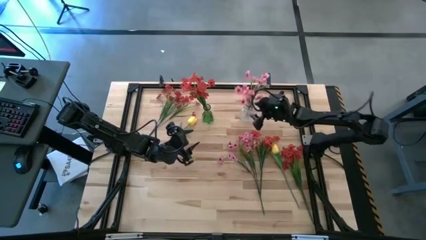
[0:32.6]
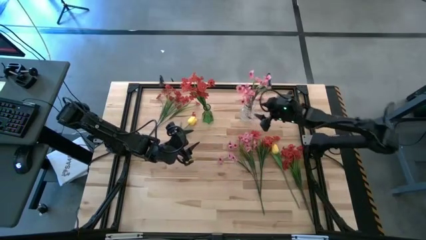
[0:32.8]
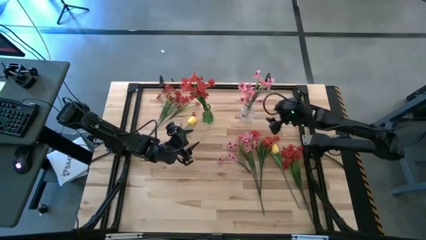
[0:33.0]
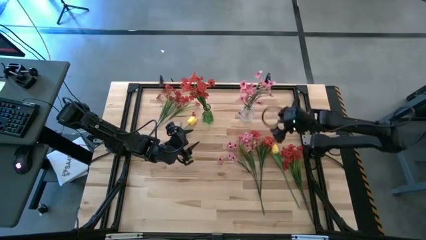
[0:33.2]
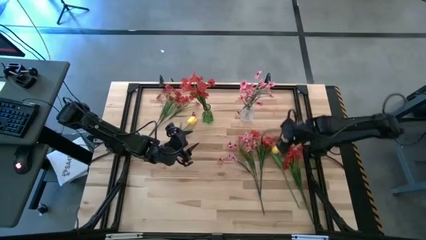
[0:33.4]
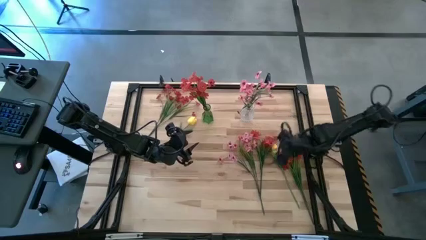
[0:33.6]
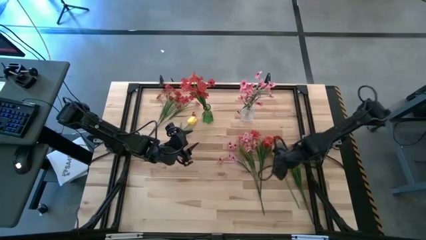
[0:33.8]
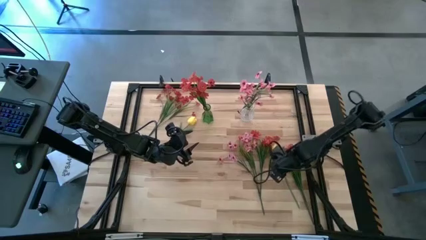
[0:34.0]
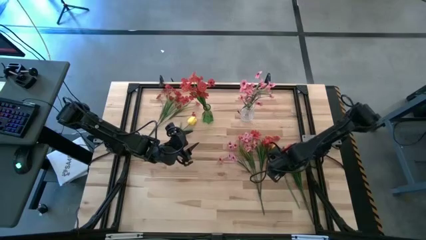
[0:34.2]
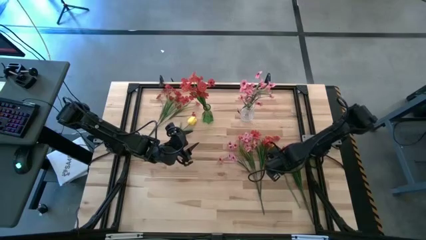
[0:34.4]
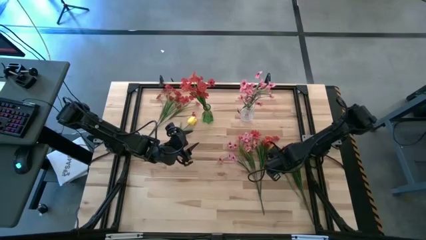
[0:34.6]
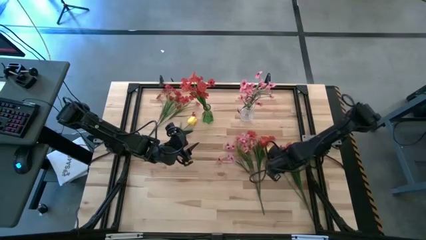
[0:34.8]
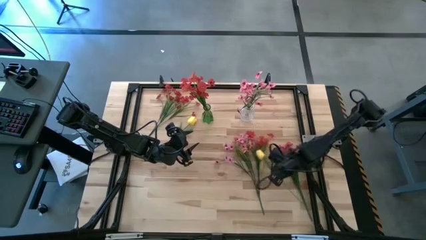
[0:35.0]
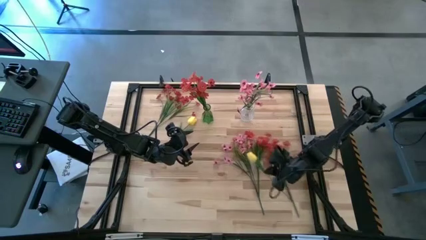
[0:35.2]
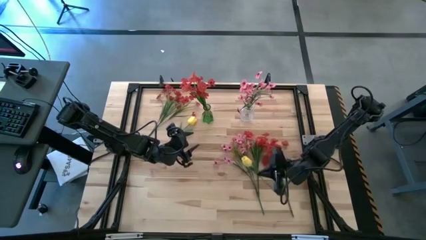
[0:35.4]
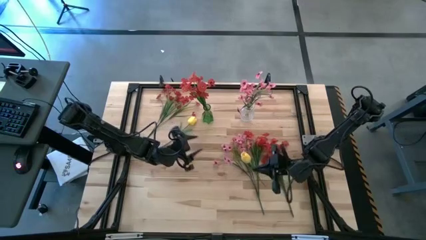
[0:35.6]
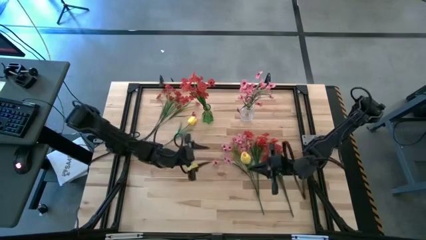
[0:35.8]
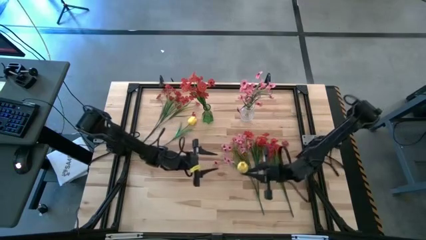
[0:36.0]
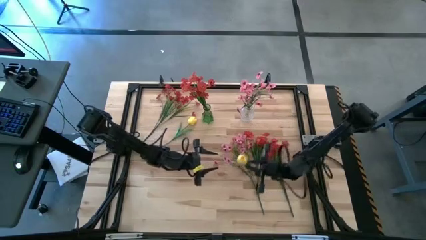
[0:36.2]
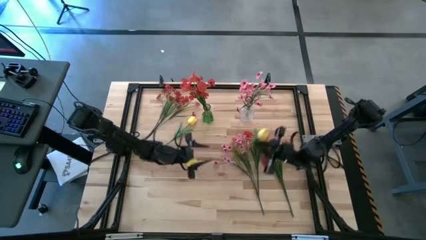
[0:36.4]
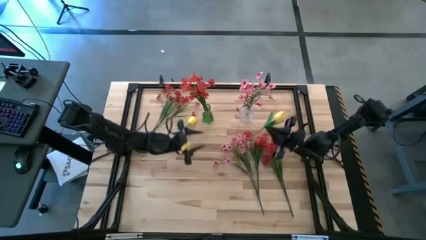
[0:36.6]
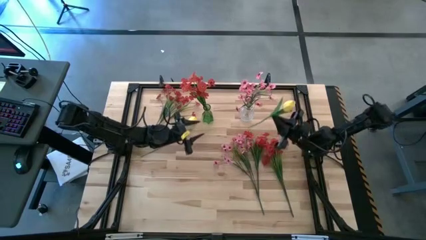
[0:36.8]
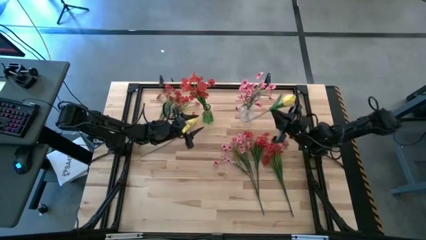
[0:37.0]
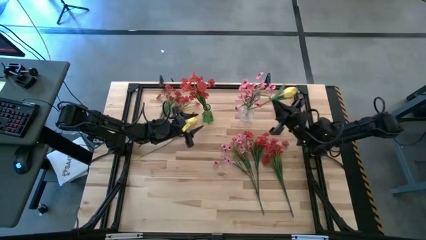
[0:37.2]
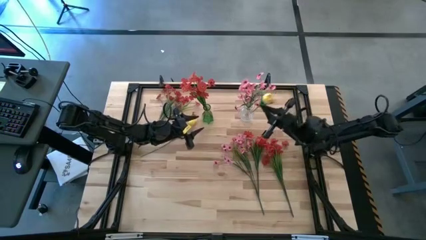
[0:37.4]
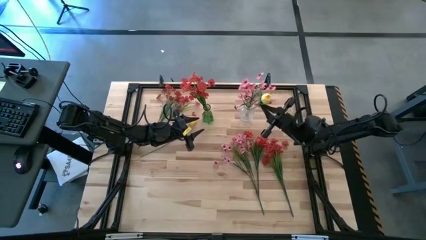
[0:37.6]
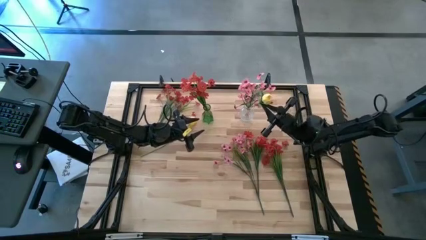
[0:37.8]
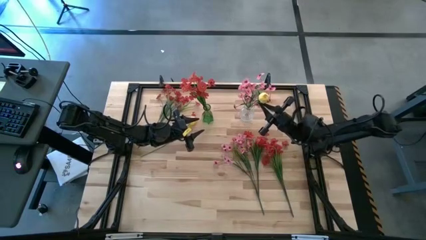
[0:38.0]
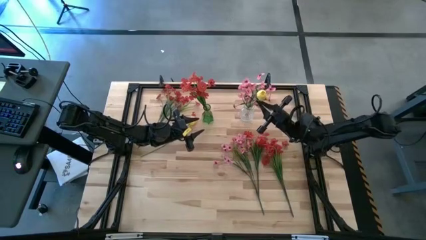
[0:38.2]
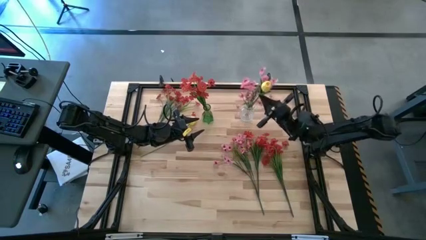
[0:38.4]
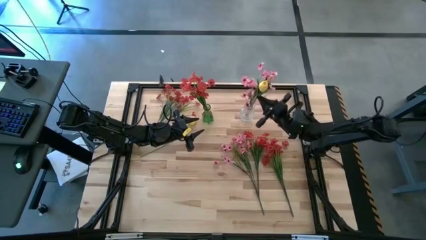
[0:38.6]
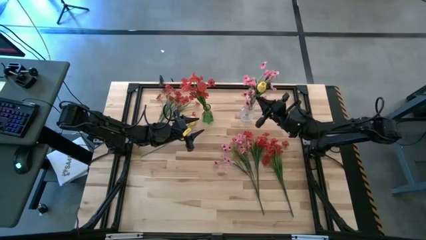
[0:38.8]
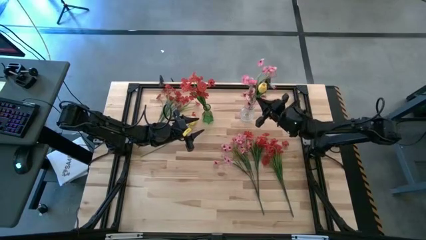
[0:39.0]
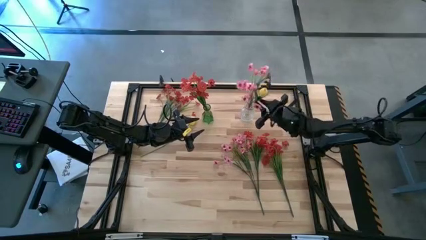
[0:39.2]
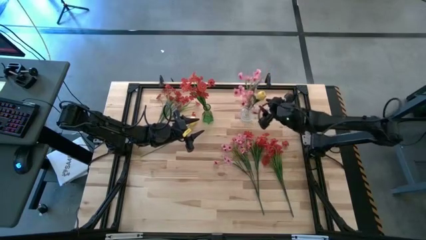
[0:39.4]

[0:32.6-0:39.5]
Task: Sort flowers into vase by color
Put the bottom yellow flower into the transparent vase

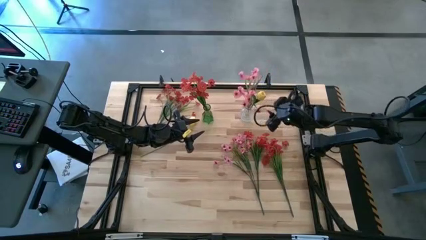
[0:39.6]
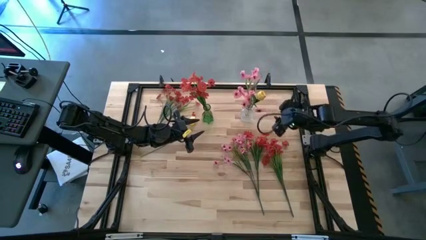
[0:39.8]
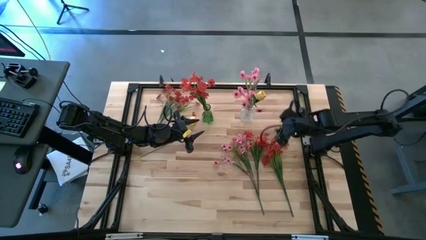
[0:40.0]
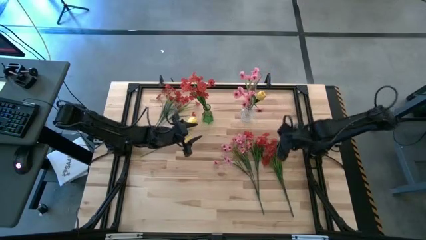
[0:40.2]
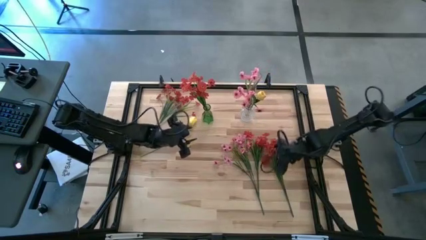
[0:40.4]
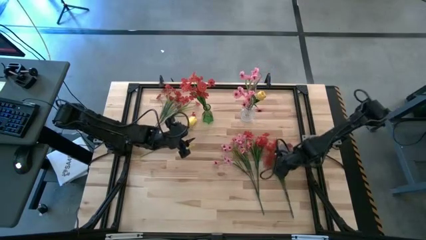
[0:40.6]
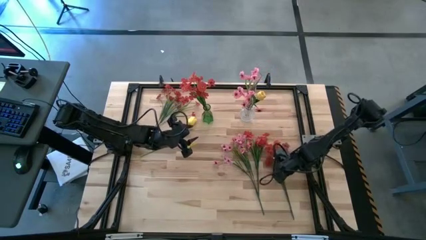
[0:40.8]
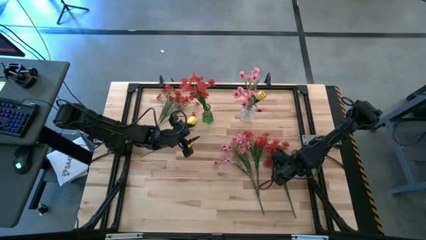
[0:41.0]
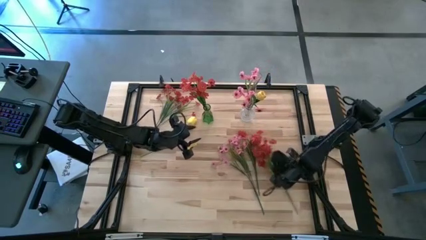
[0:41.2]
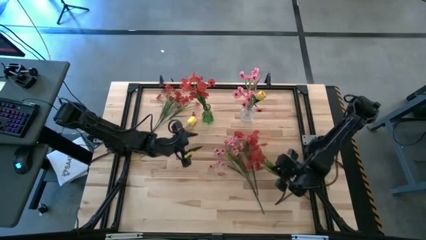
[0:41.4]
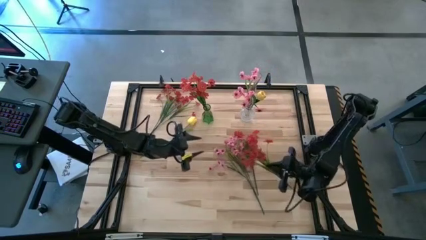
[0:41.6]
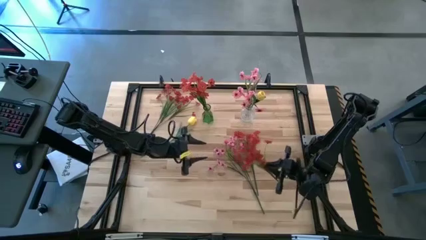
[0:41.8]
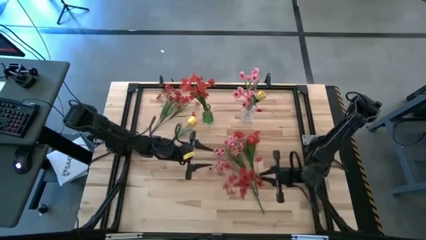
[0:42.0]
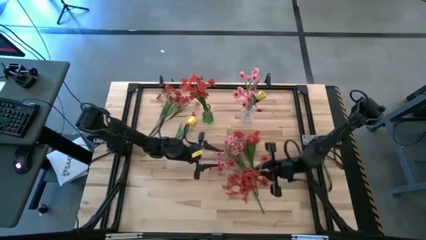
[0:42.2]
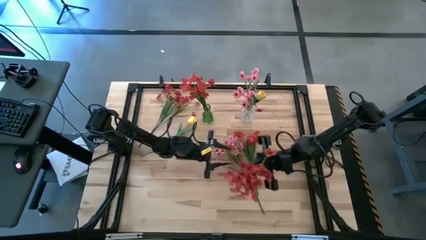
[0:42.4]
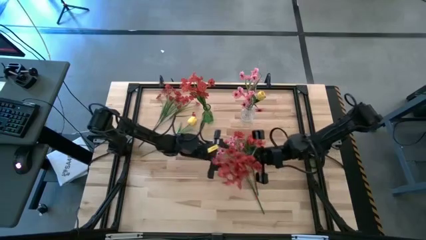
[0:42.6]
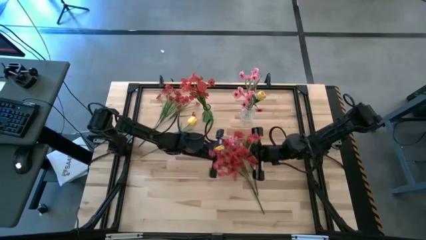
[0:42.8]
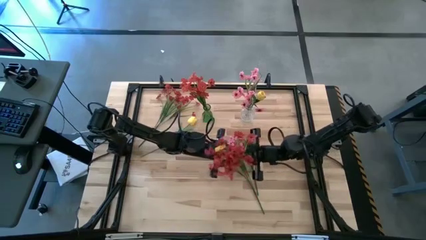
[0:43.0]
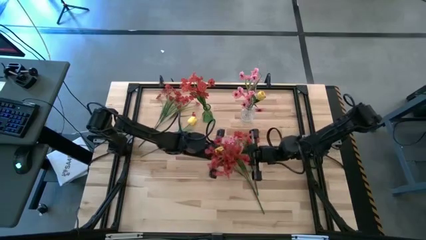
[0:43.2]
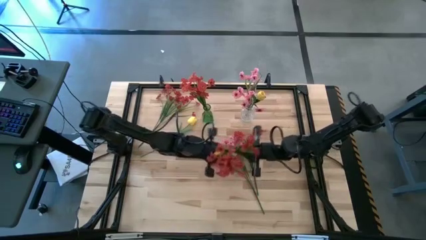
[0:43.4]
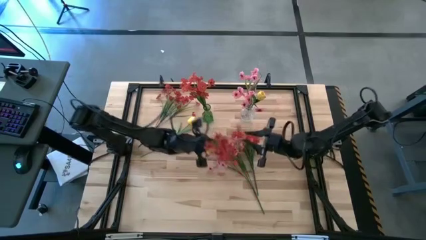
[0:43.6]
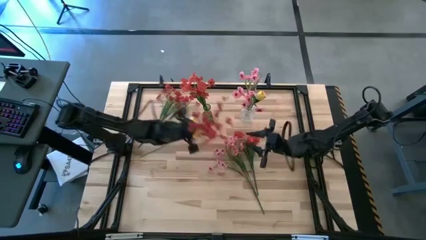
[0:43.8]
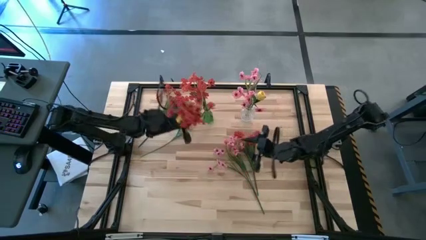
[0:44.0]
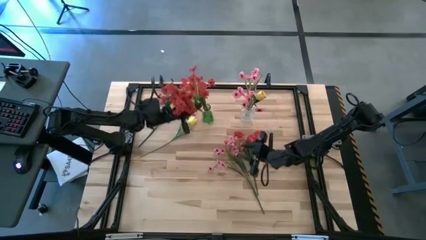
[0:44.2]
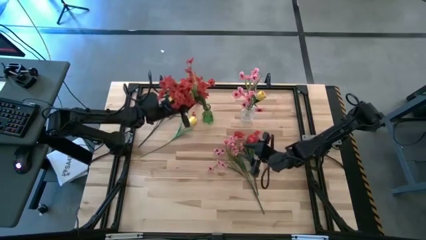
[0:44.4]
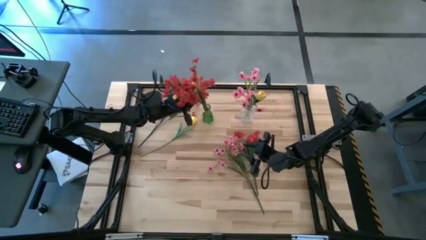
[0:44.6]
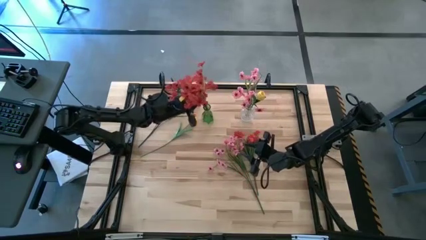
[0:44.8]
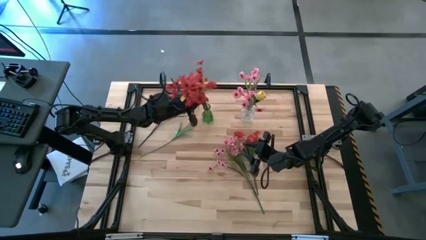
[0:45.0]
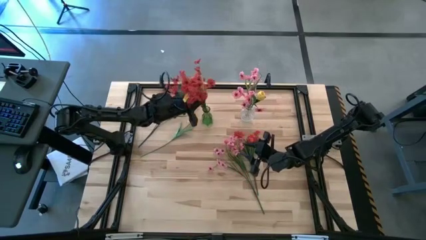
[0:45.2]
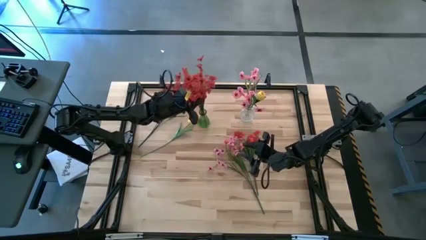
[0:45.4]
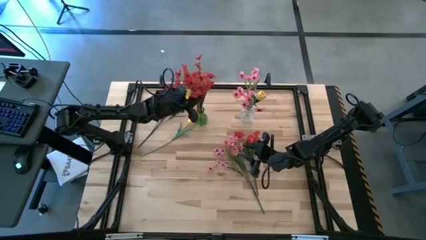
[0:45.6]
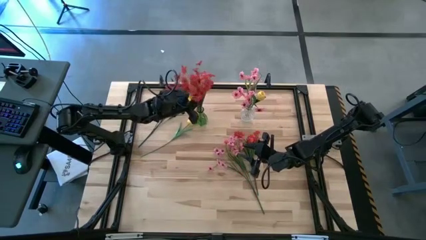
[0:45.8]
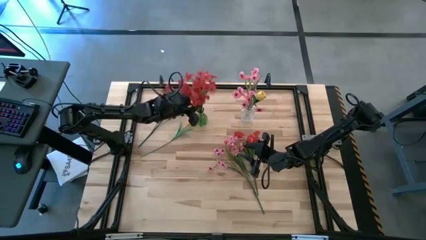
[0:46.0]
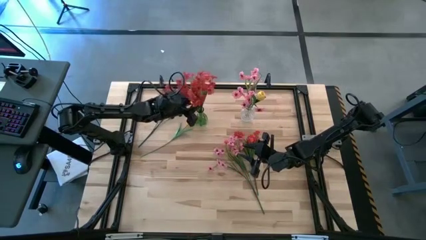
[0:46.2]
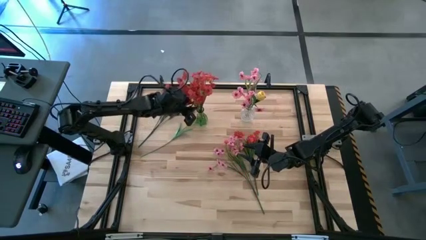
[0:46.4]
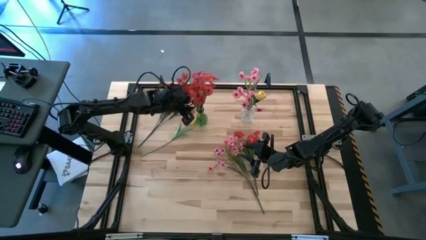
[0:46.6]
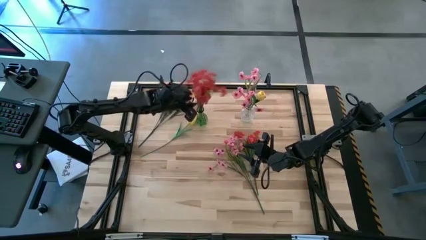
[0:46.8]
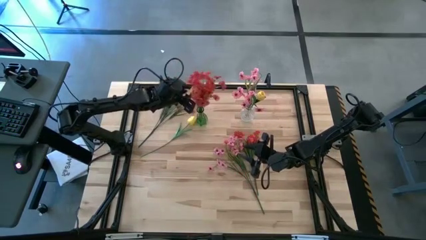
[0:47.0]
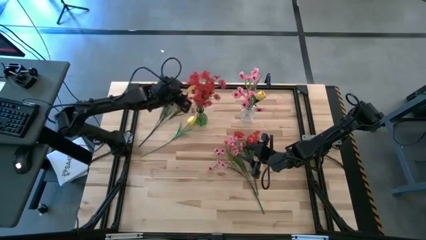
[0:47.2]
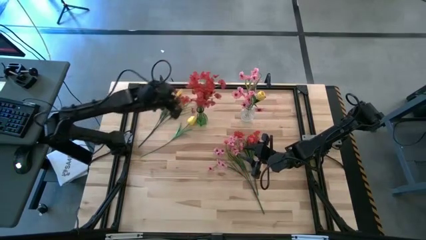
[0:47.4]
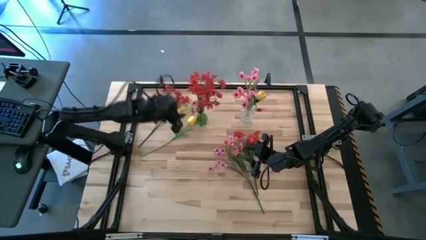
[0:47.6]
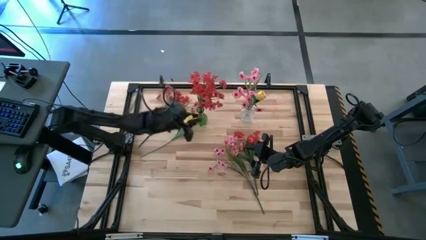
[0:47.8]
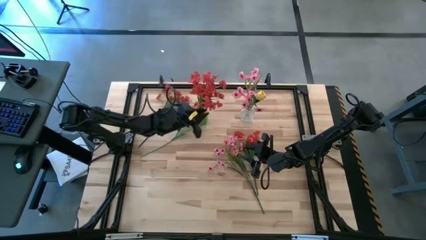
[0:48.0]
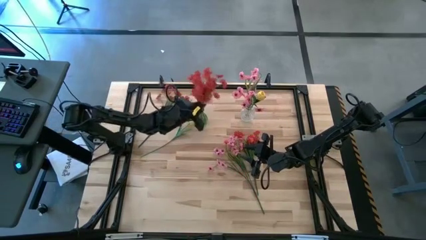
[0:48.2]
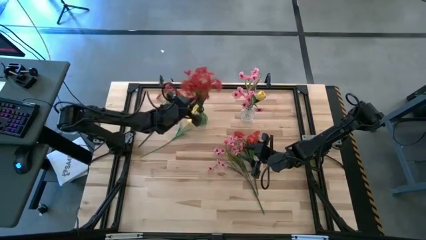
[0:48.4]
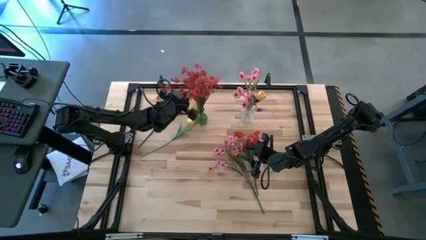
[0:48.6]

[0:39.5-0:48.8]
Put the bottom right red flower into the green vase
